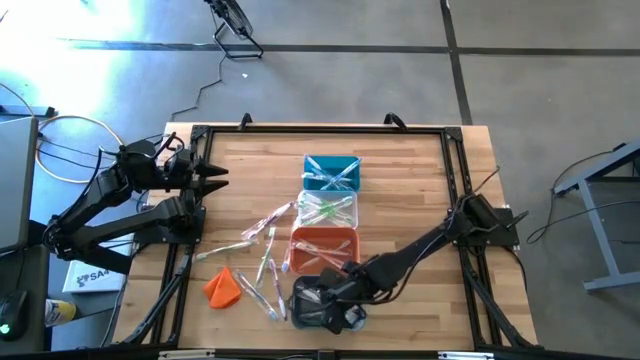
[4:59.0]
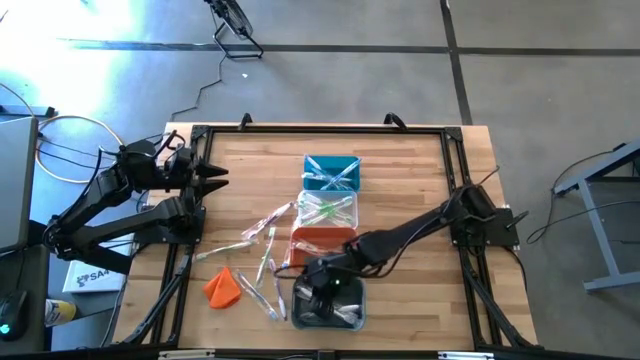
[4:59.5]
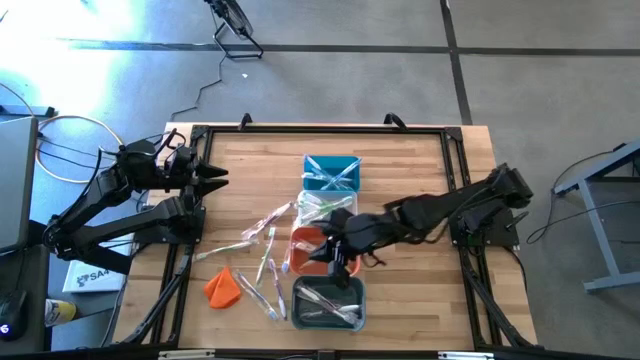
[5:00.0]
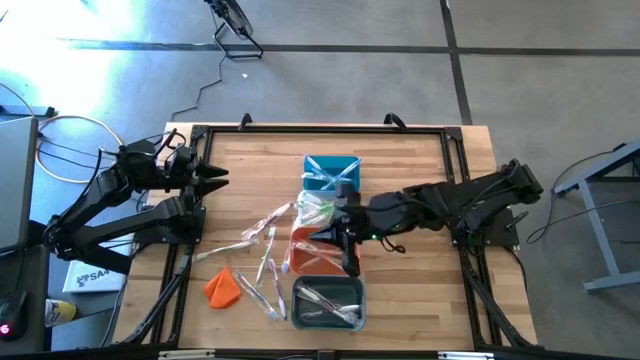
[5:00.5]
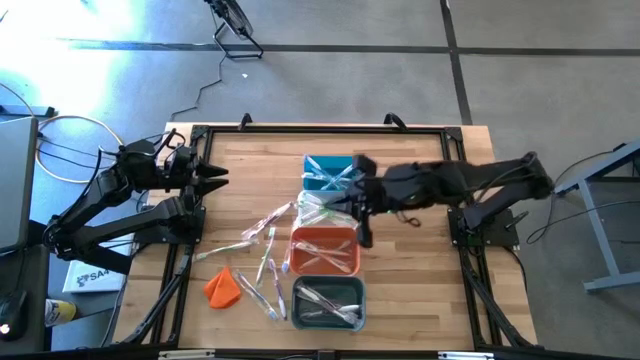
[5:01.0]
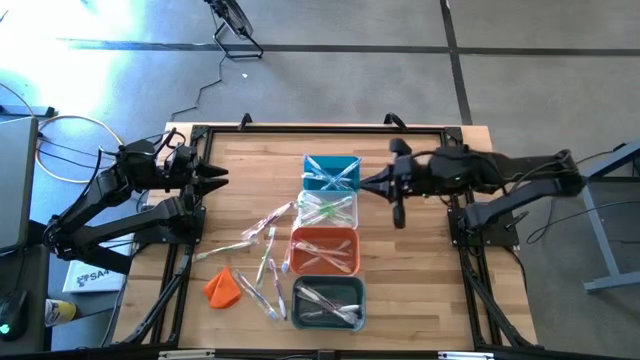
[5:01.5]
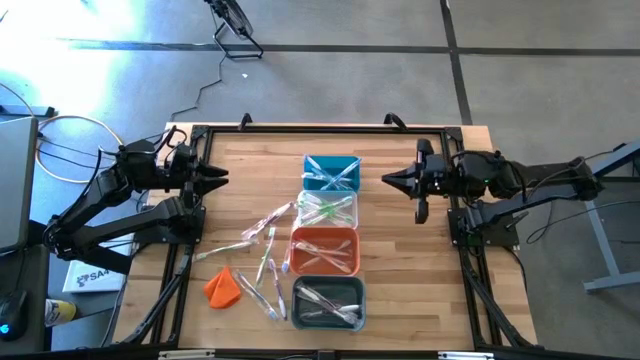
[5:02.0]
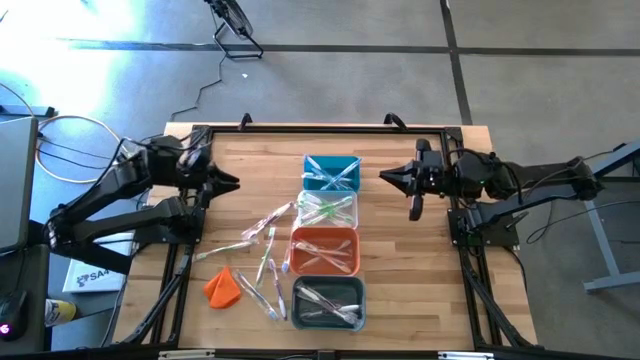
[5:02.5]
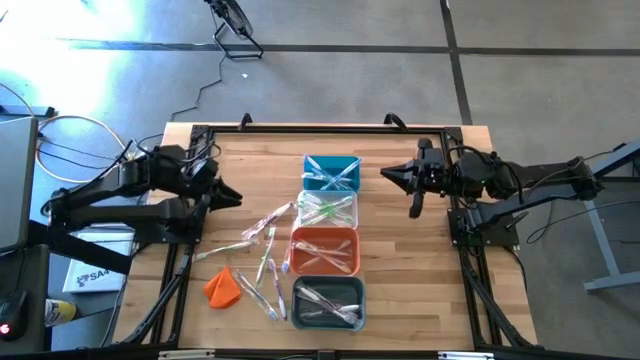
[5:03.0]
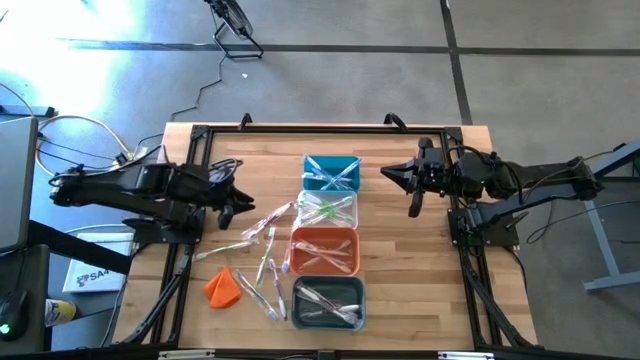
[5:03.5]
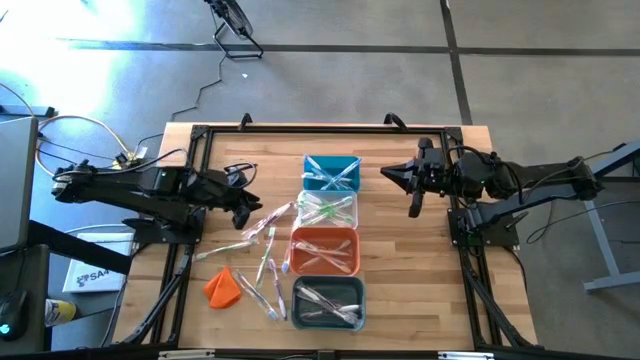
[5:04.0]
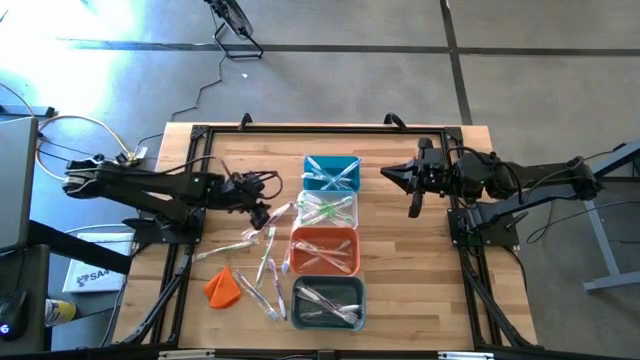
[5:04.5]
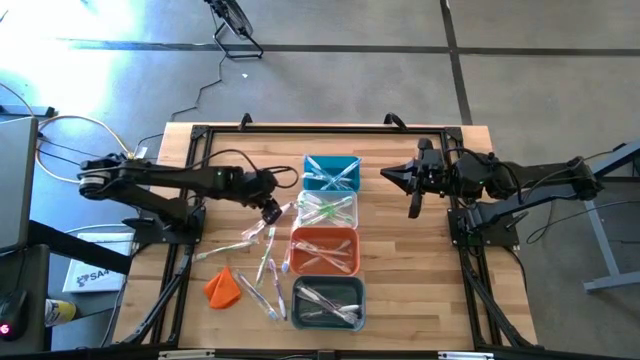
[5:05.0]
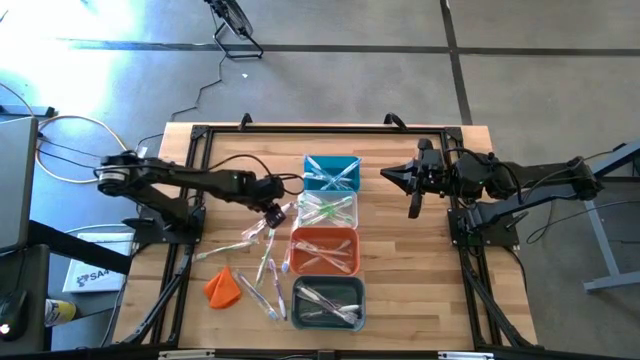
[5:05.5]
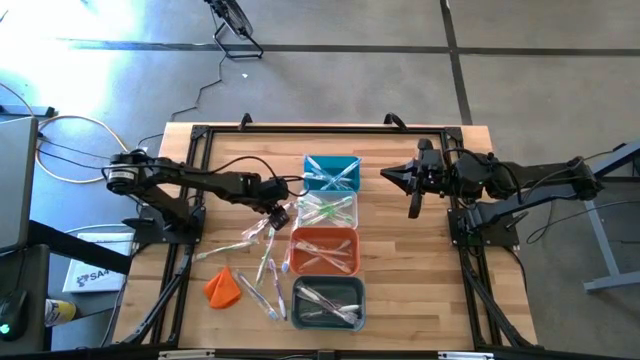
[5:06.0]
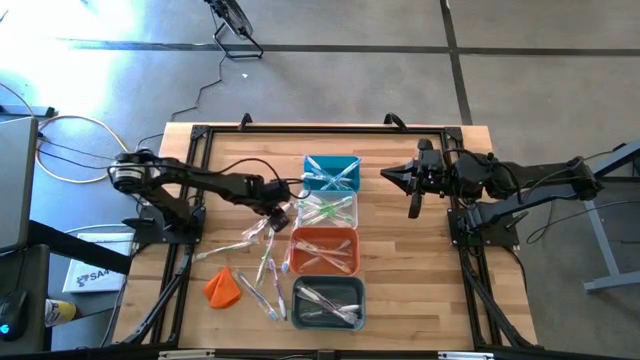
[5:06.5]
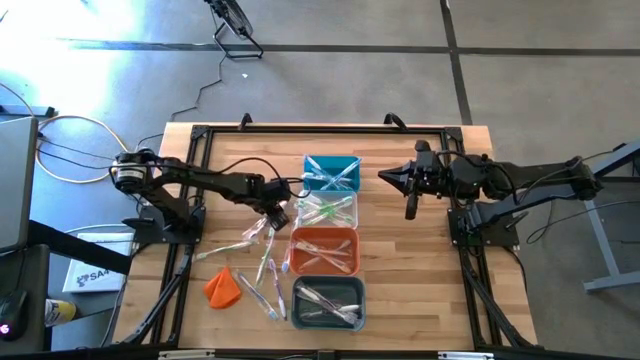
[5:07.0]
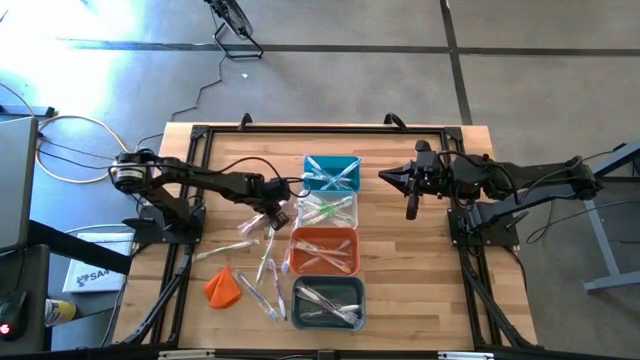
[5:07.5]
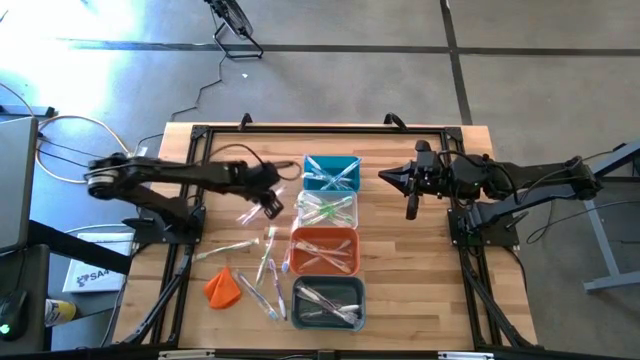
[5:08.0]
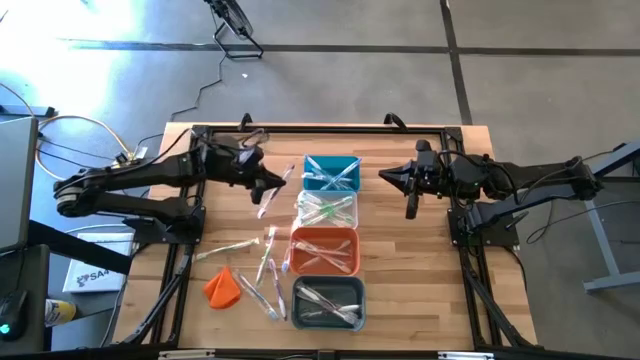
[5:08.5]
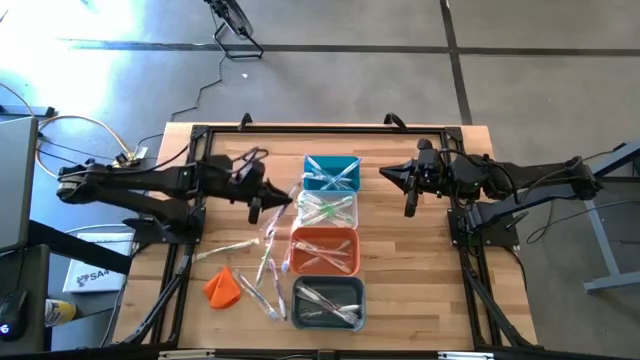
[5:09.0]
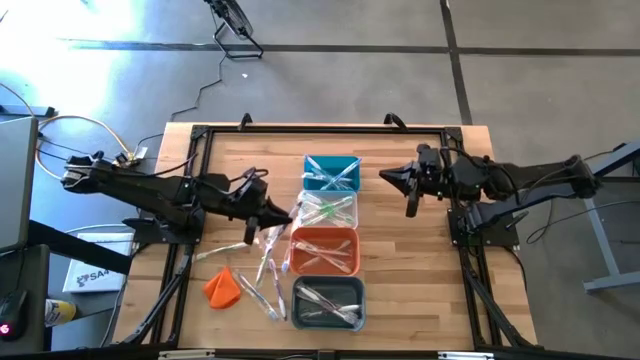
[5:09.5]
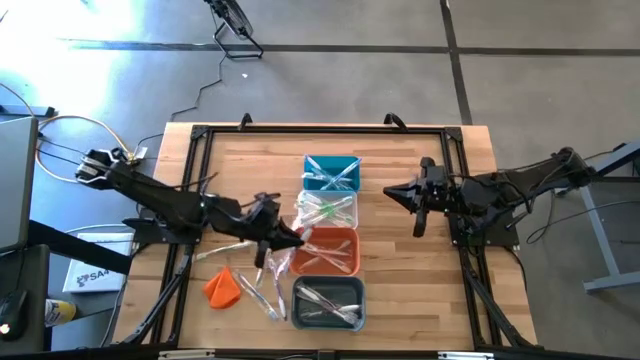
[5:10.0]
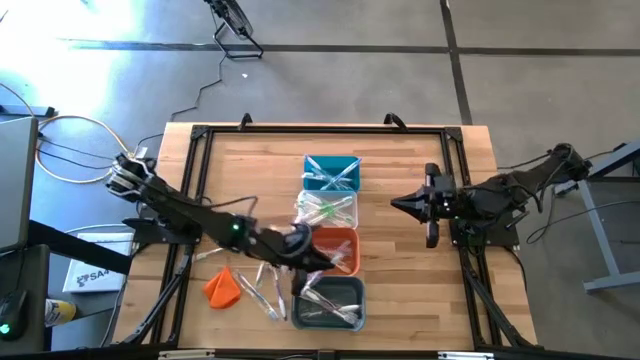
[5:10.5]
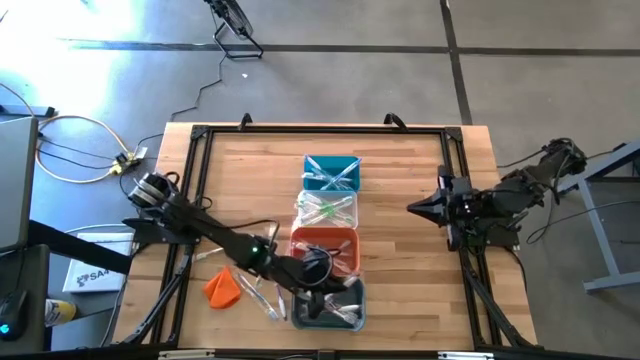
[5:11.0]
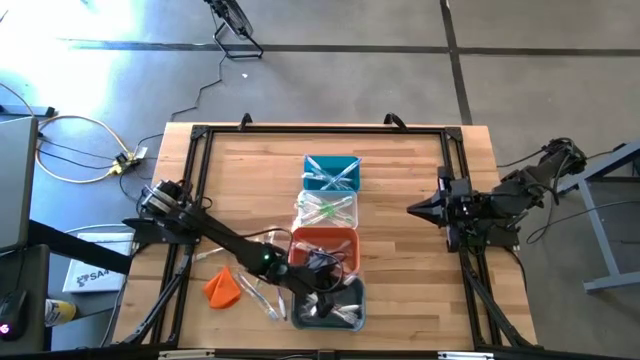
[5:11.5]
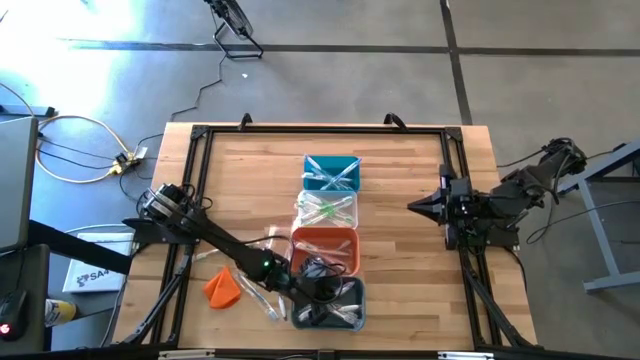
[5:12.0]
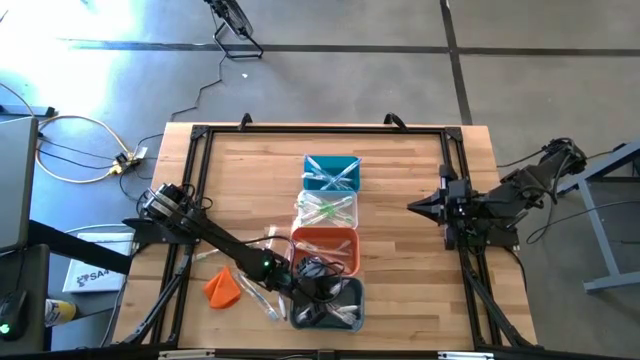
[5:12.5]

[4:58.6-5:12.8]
Task: Pick & Place Toothbrushes
Put the violet toothbrush into the green bin

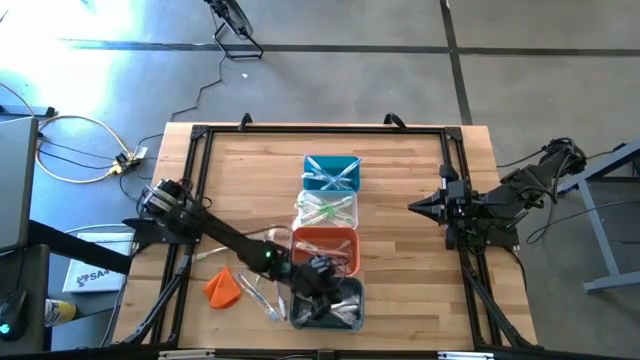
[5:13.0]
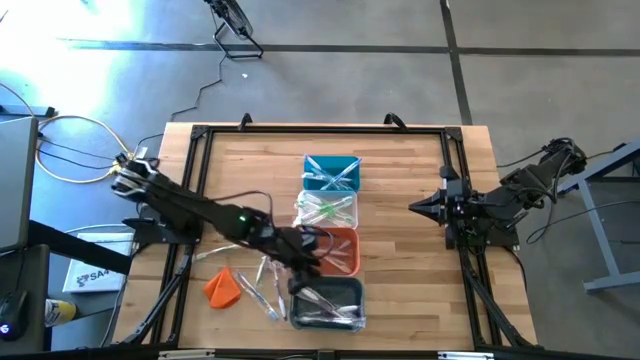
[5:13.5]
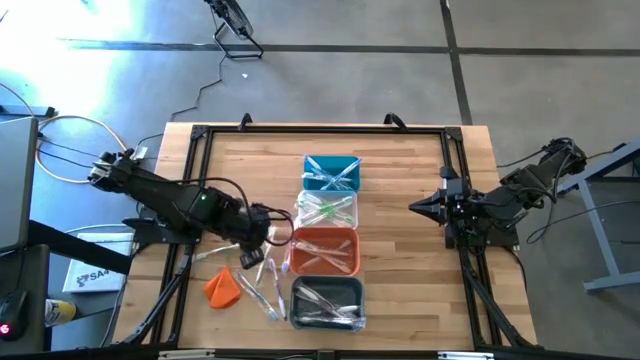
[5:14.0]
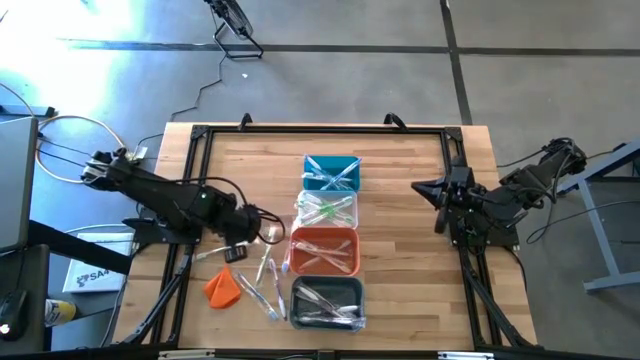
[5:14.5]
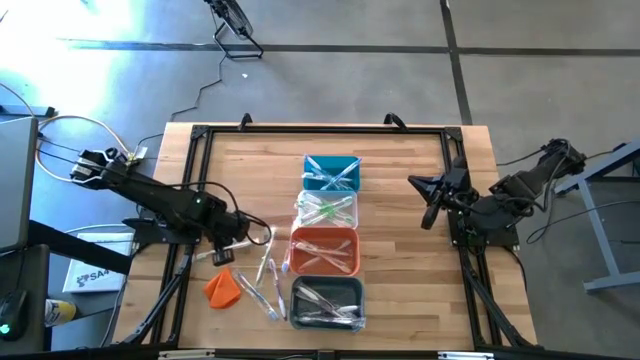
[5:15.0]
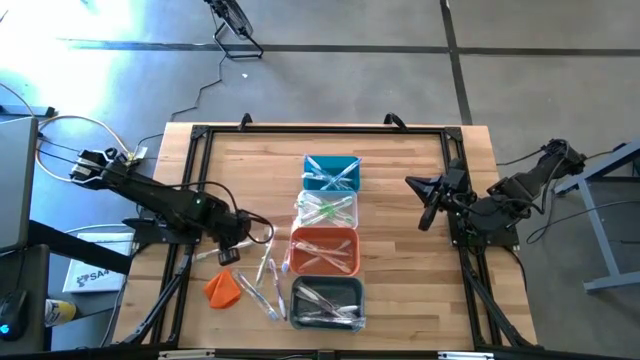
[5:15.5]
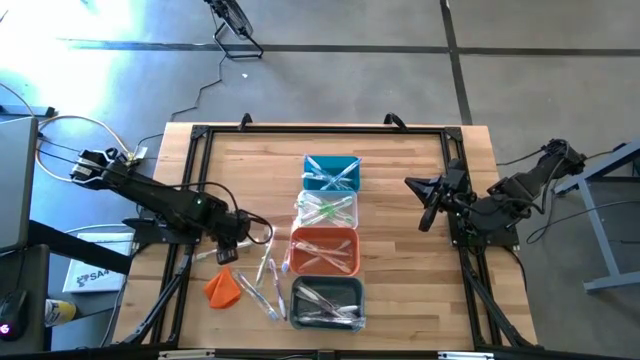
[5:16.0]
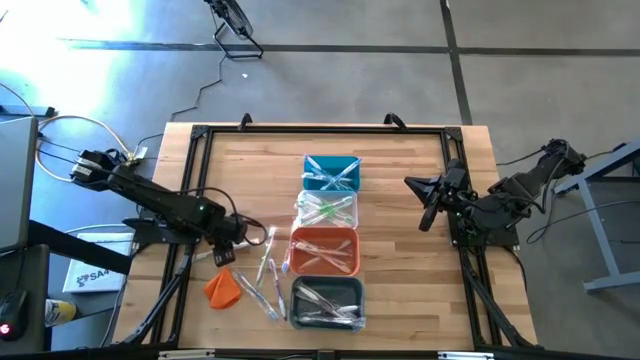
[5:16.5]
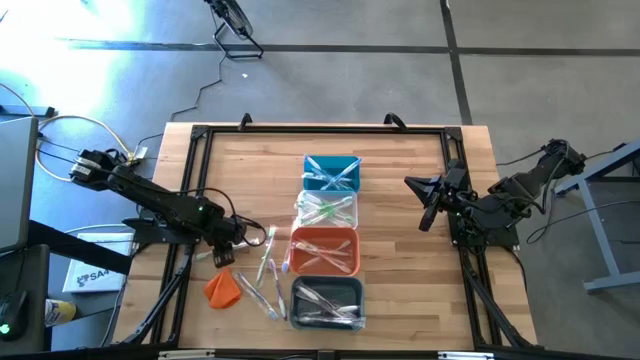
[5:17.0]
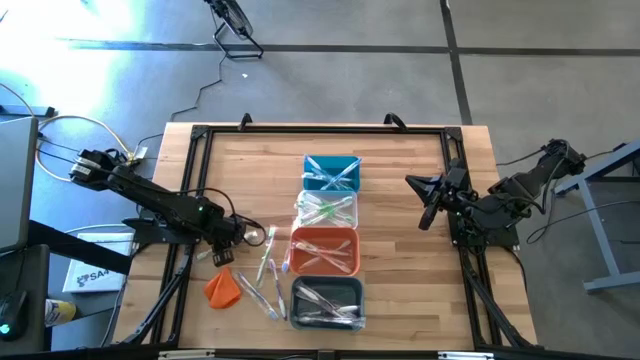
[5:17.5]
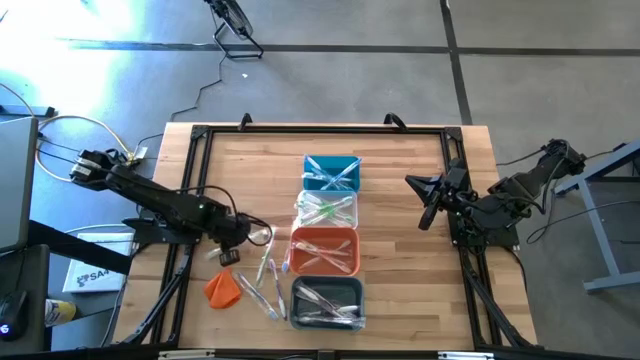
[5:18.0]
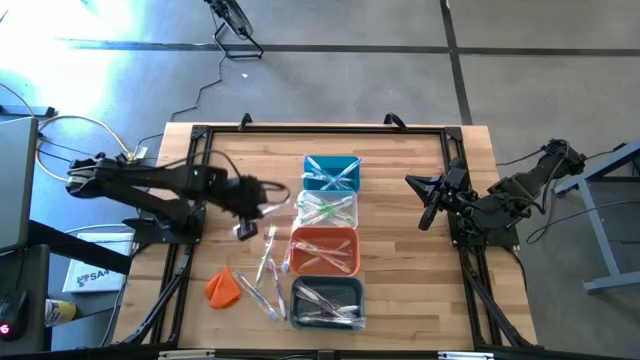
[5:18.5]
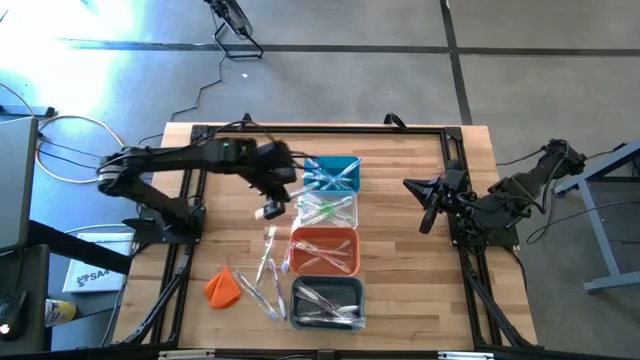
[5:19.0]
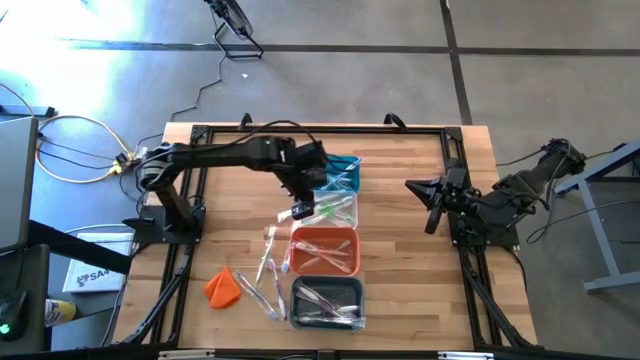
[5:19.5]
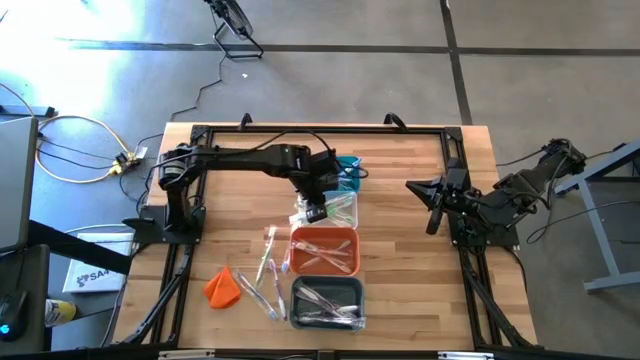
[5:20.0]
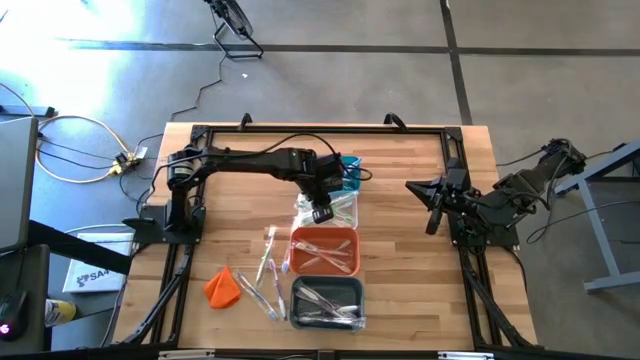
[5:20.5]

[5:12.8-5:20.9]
Put the green toothbrush into the transparent bin
